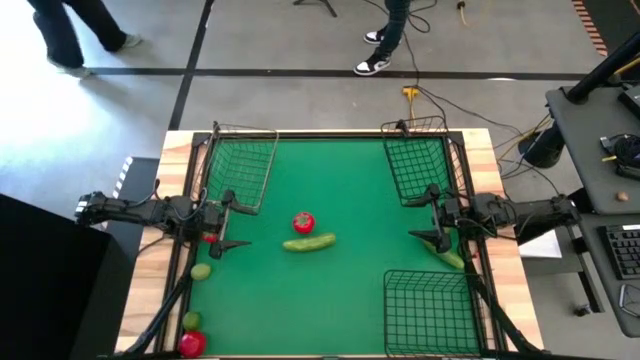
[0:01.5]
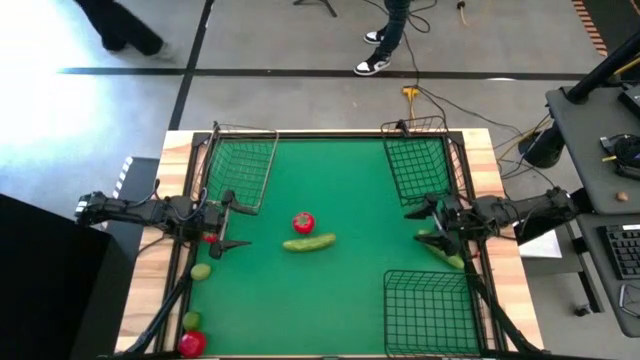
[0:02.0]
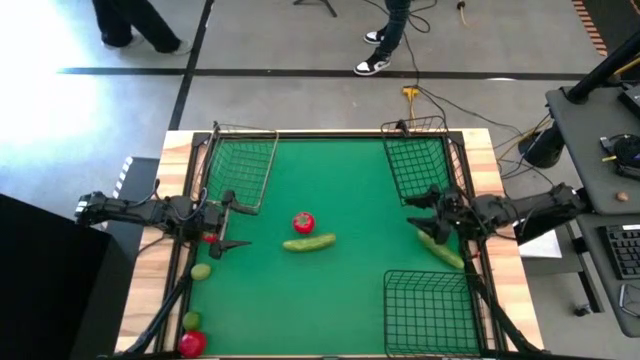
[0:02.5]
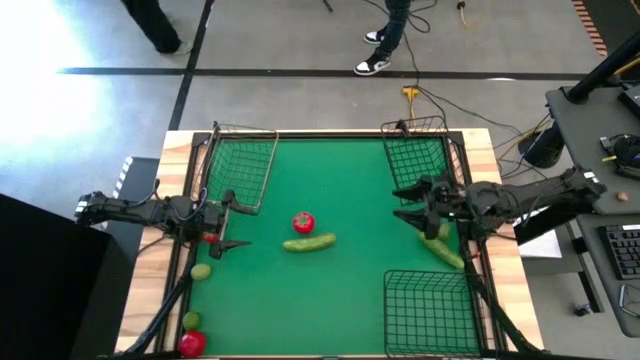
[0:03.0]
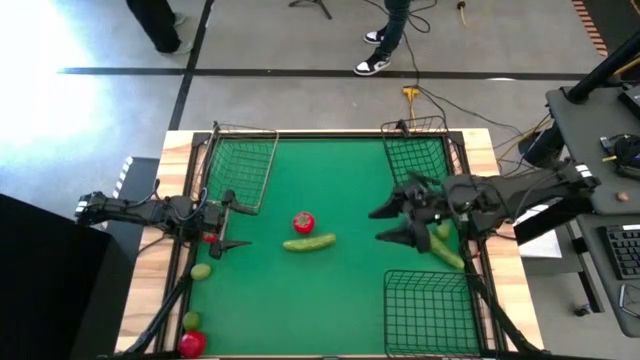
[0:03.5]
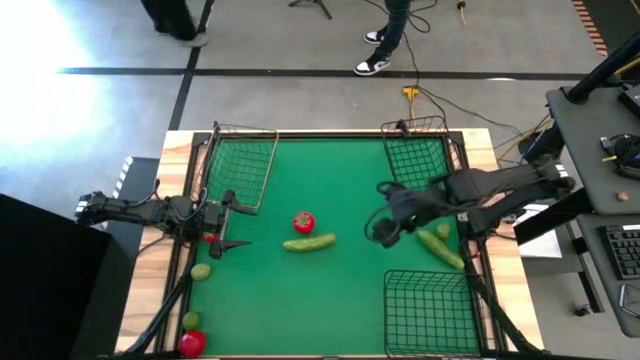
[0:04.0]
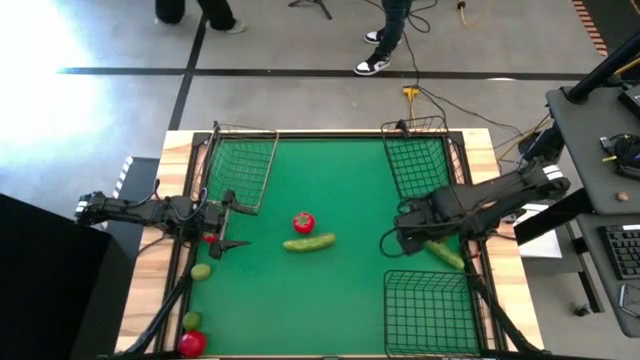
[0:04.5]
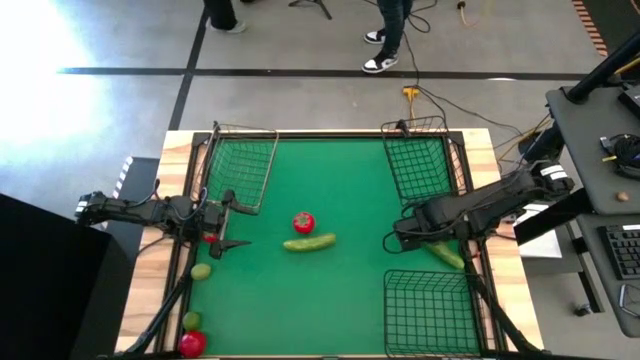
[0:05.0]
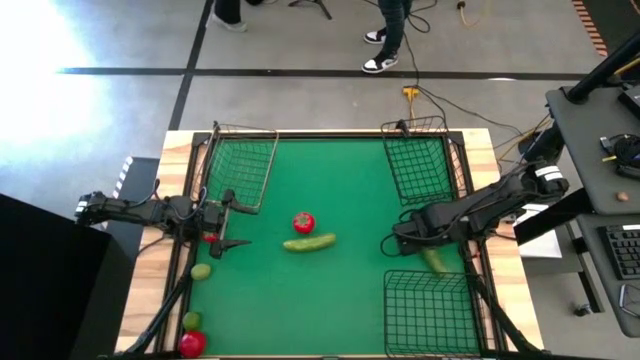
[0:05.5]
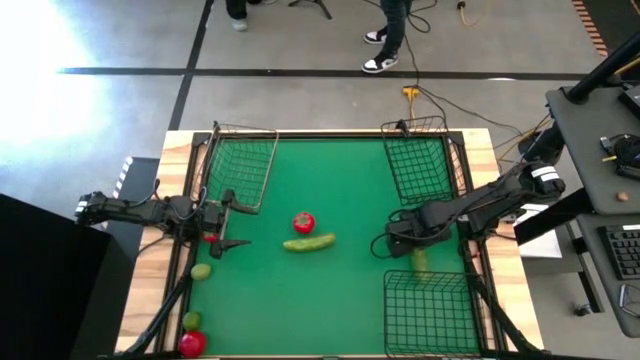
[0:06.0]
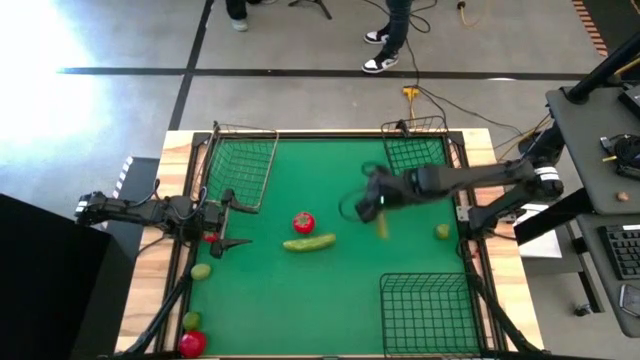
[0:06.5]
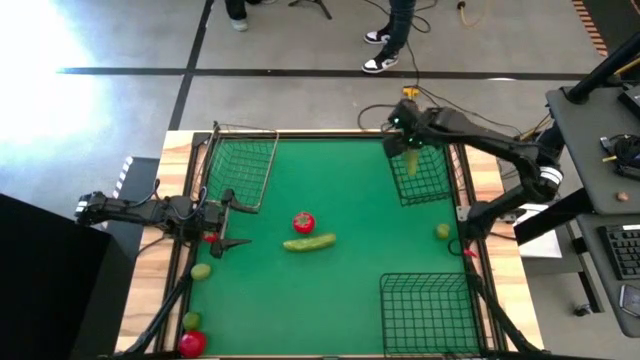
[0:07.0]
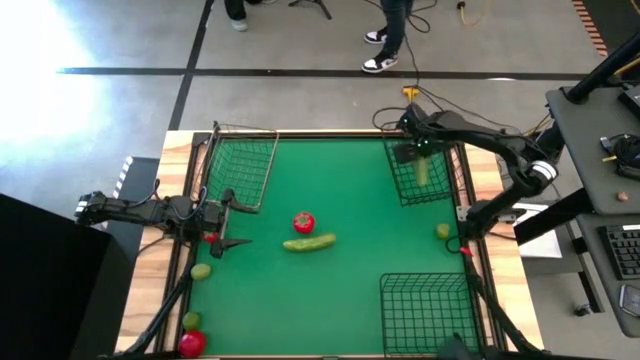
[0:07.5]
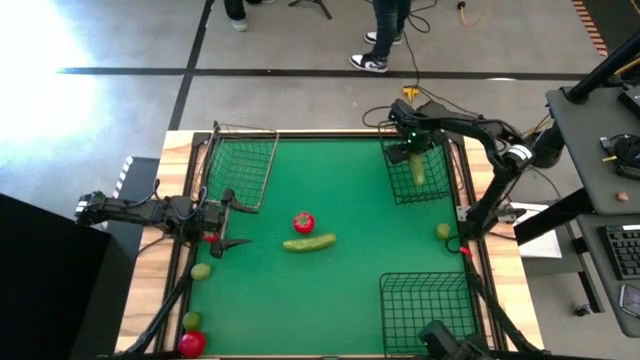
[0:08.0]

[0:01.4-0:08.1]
Task: Sort produce into baskets
Put the right cucumber into the top right wire basket

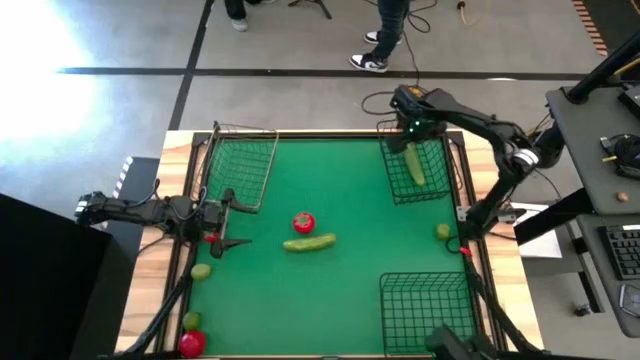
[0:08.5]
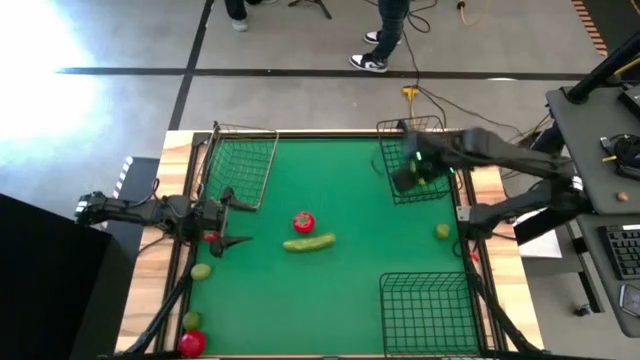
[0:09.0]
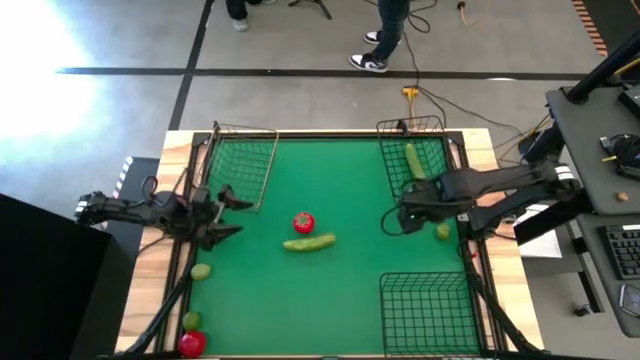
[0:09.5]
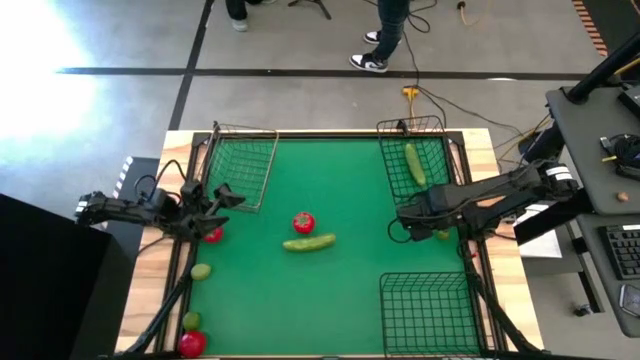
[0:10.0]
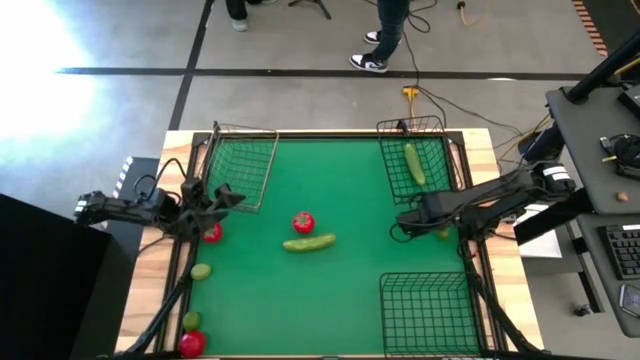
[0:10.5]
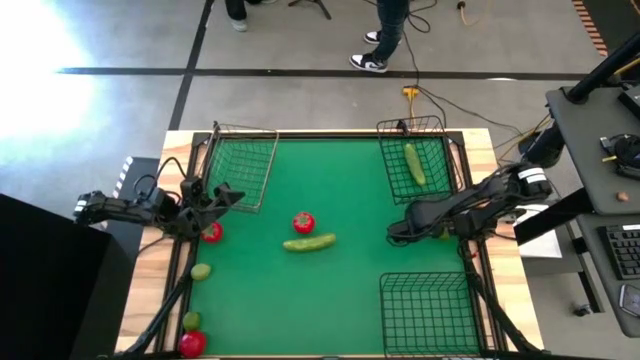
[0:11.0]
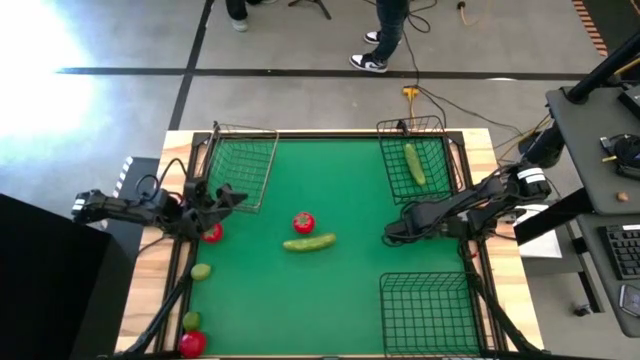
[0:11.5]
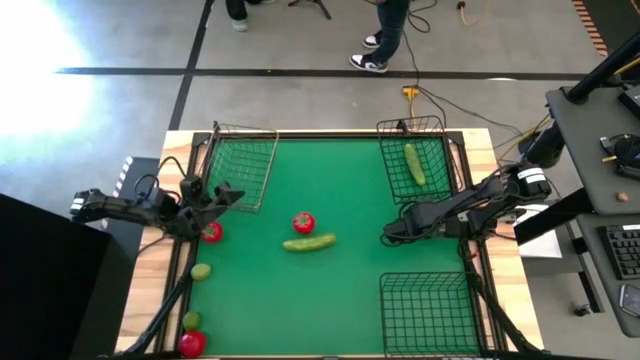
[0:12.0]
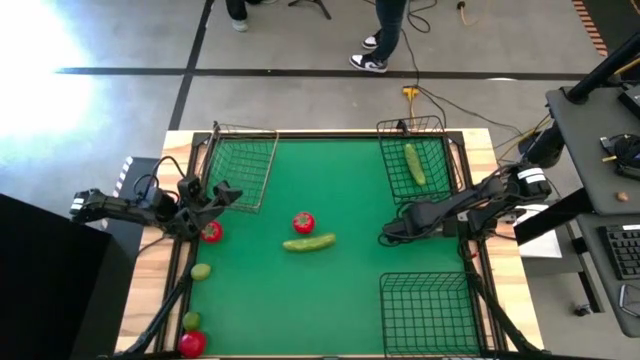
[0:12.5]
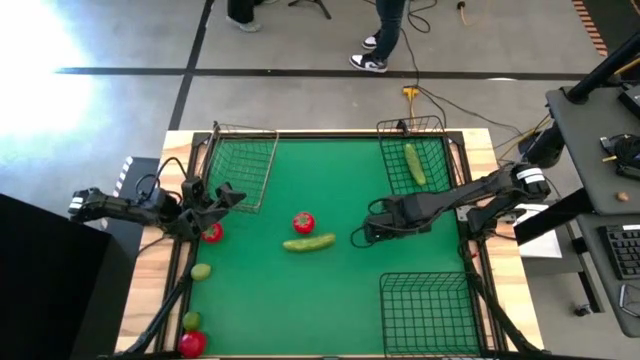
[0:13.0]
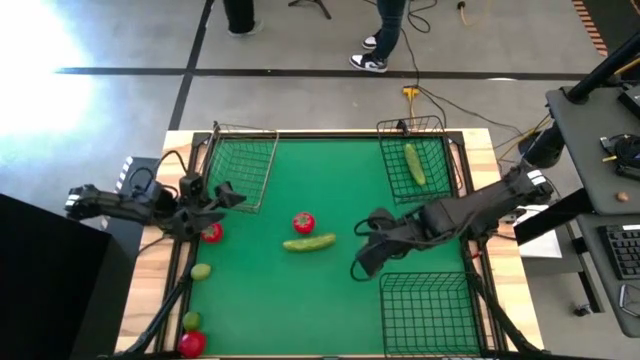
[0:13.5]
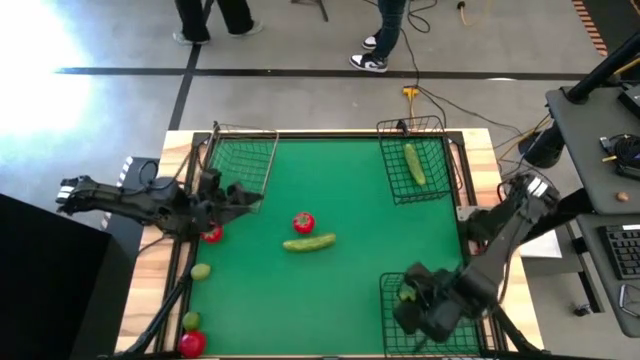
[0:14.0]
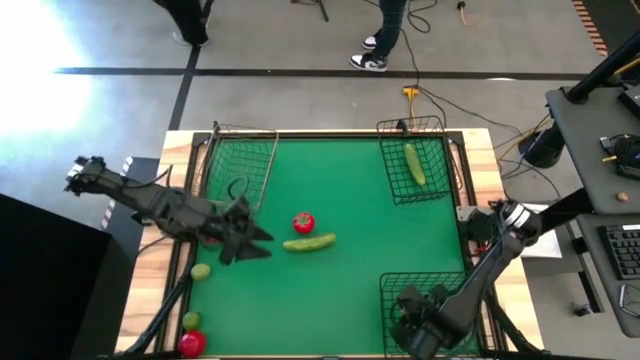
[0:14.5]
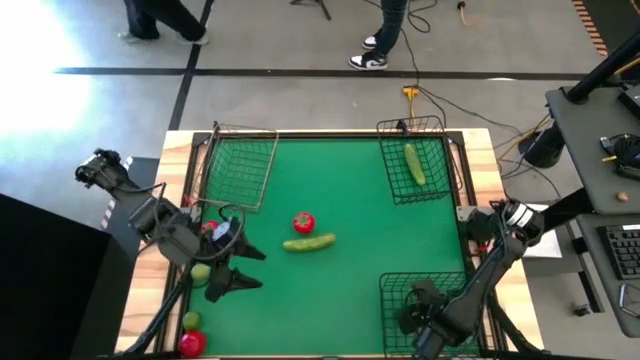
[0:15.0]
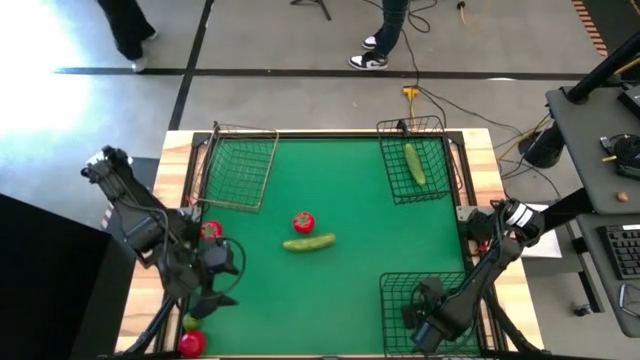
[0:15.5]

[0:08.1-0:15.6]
Put the top right lime into the bottom right wire basket

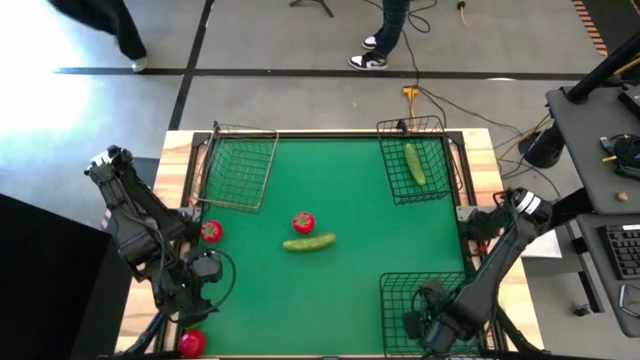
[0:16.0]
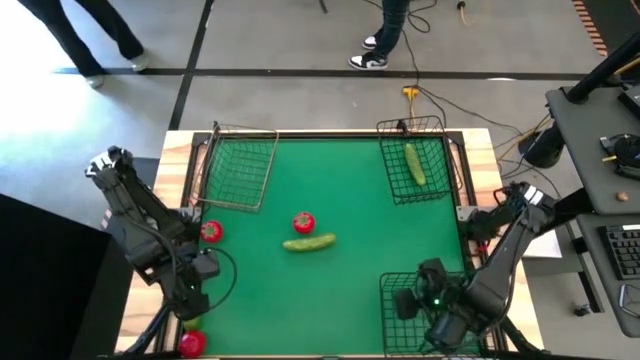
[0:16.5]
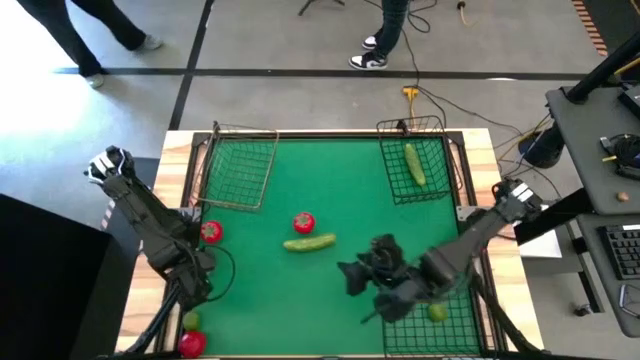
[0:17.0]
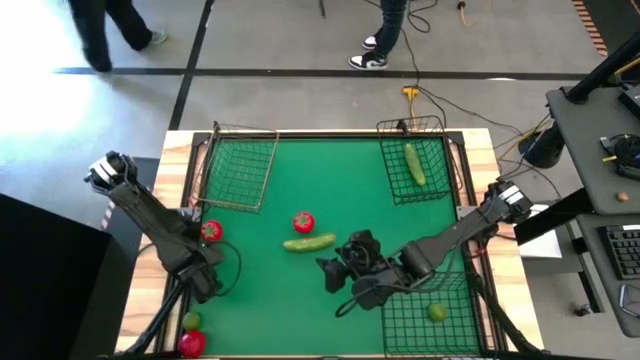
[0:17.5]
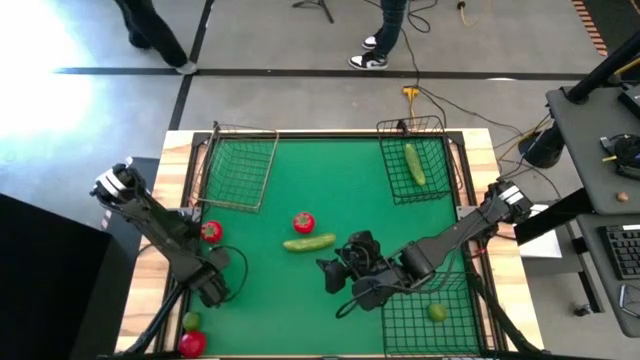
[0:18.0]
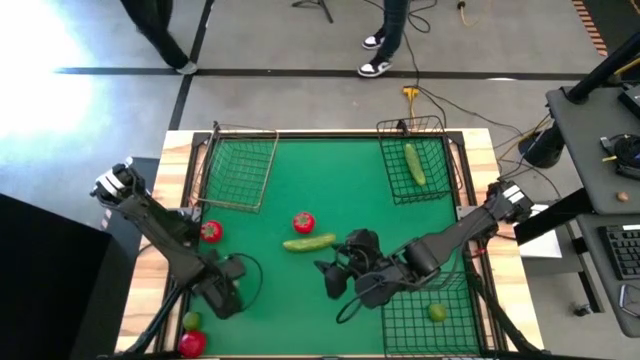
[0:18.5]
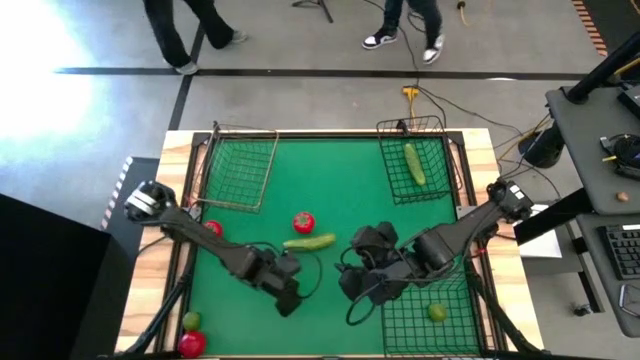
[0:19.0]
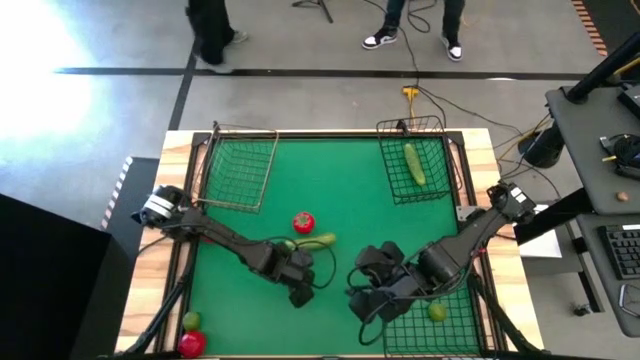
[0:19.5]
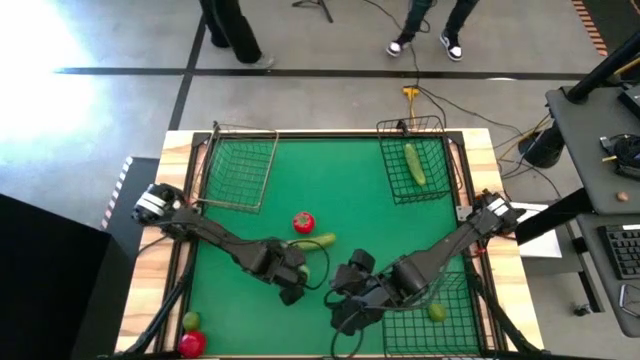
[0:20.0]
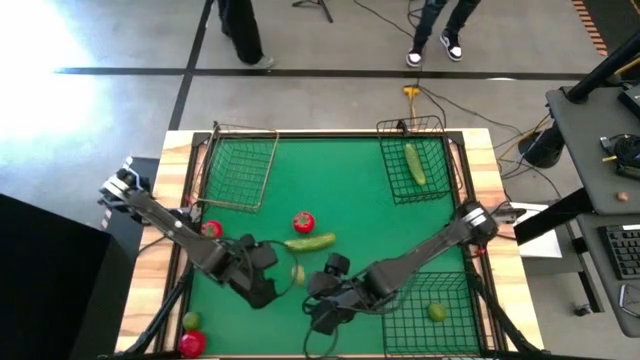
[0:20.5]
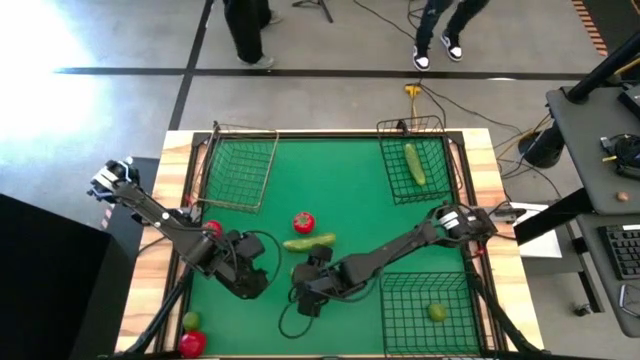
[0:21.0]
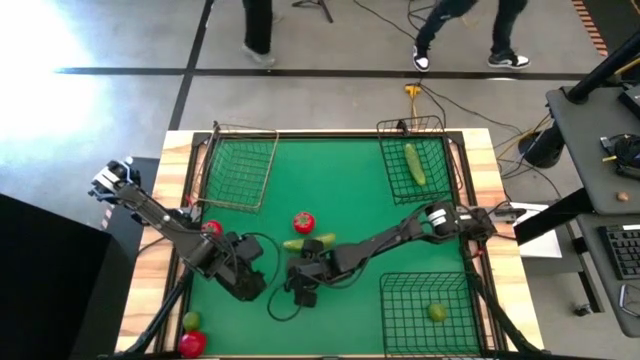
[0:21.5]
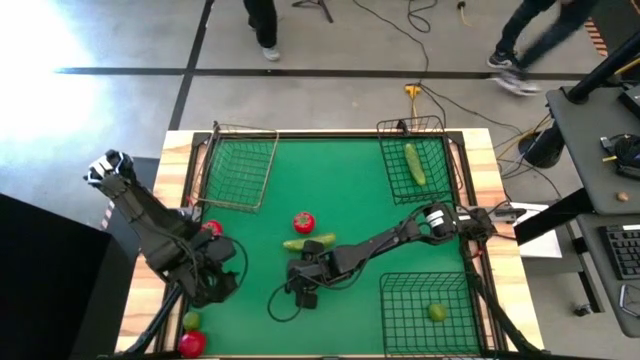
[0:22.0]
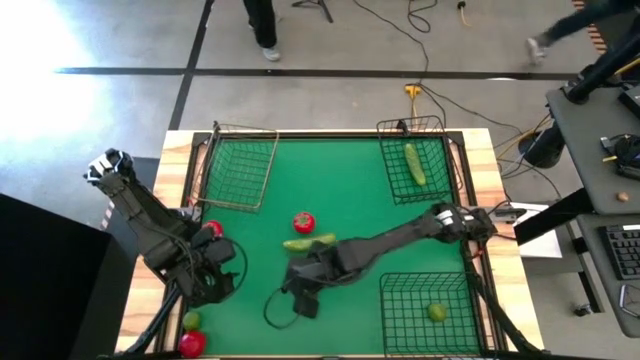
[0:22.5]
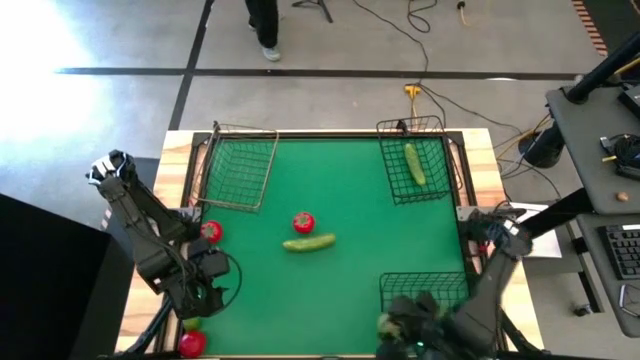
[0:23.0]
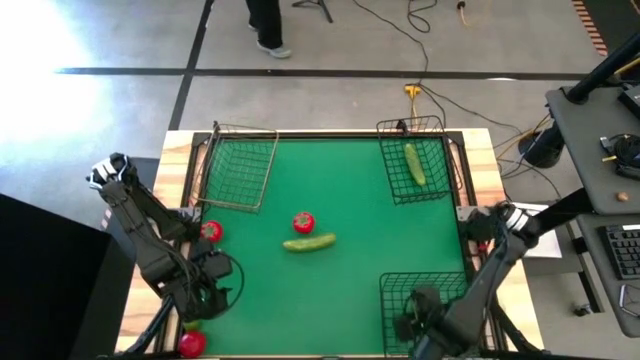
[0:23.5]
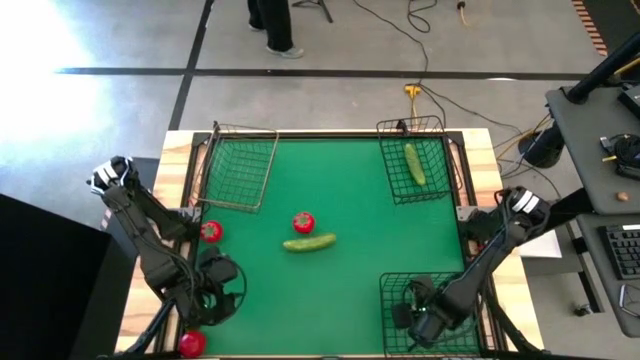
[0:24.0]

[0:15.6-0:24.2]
Put the top lime into the bottom right wire basket
